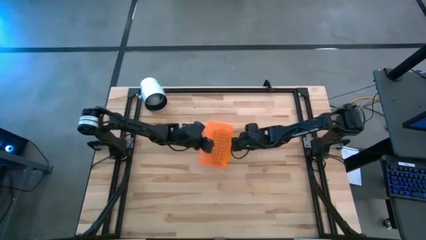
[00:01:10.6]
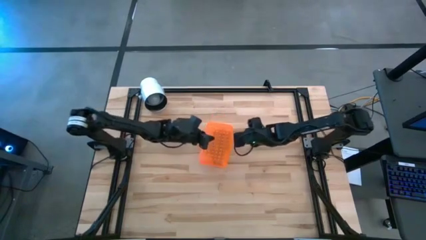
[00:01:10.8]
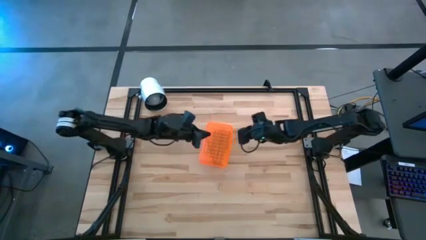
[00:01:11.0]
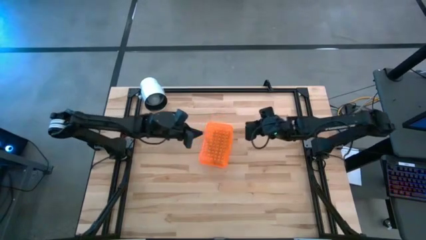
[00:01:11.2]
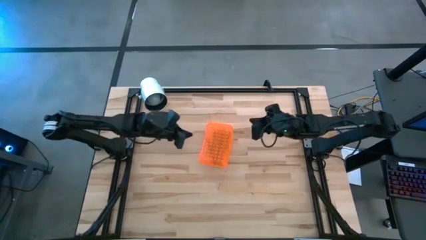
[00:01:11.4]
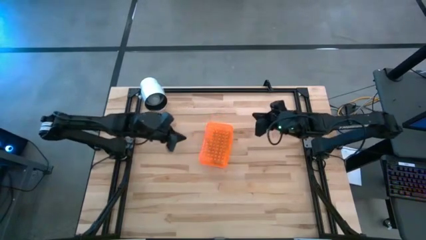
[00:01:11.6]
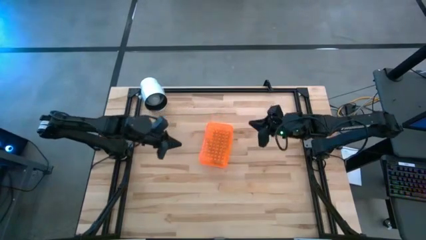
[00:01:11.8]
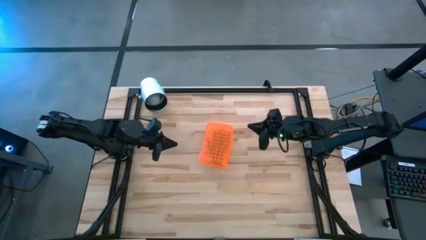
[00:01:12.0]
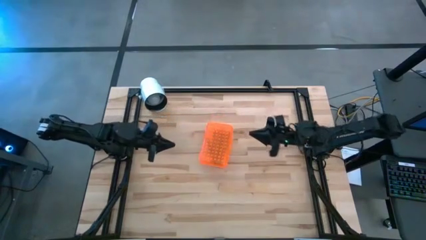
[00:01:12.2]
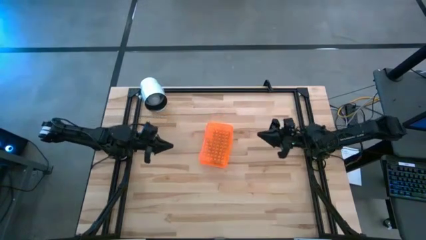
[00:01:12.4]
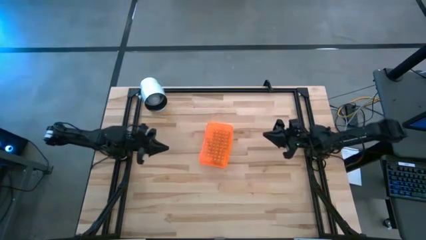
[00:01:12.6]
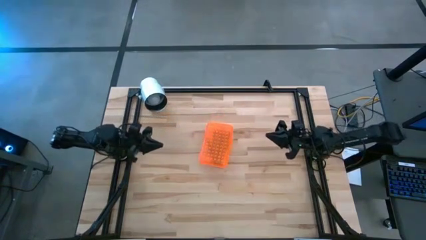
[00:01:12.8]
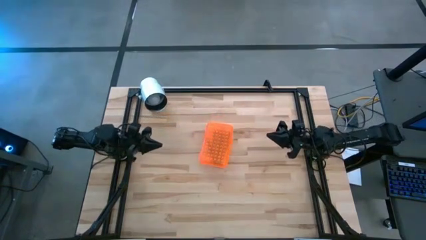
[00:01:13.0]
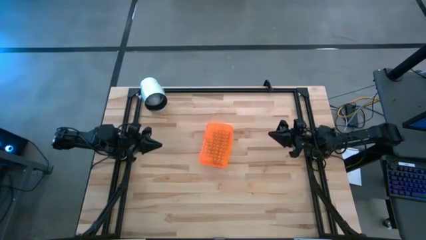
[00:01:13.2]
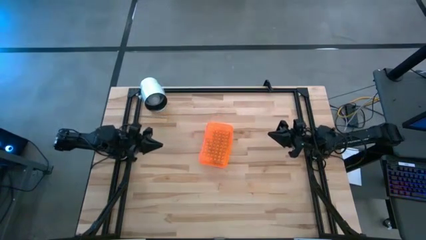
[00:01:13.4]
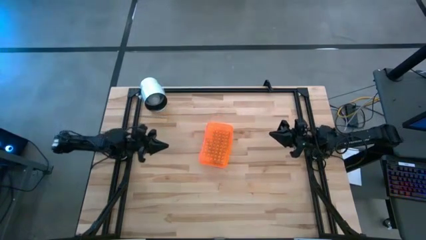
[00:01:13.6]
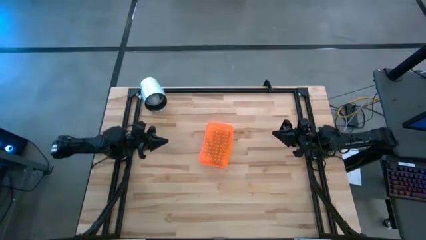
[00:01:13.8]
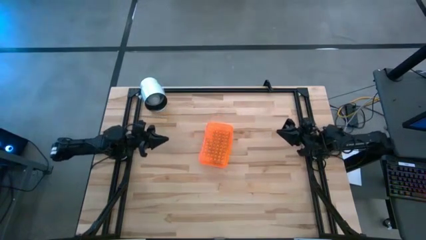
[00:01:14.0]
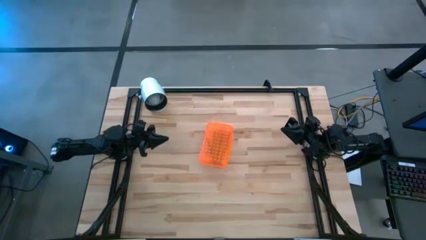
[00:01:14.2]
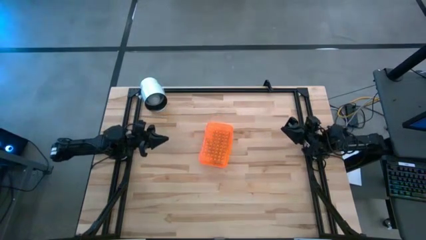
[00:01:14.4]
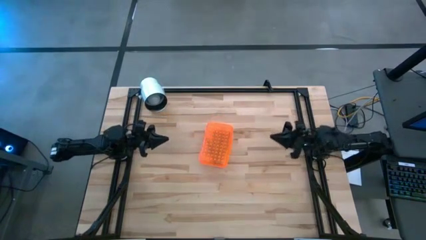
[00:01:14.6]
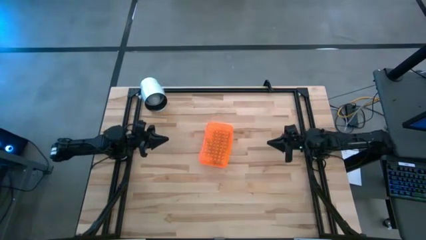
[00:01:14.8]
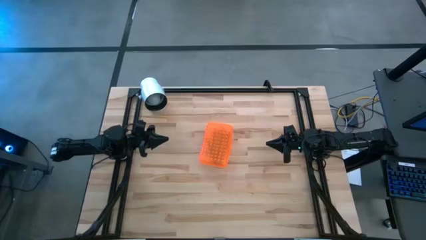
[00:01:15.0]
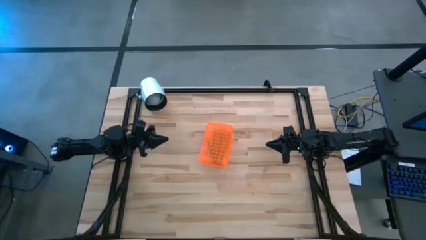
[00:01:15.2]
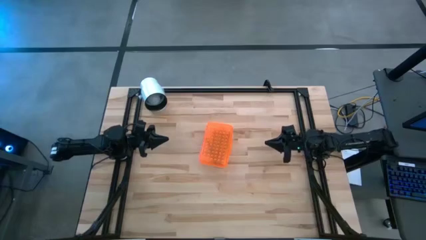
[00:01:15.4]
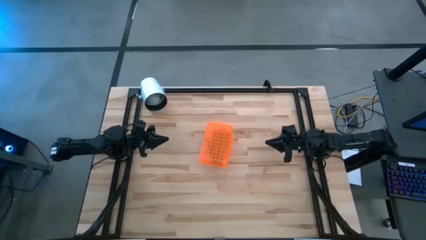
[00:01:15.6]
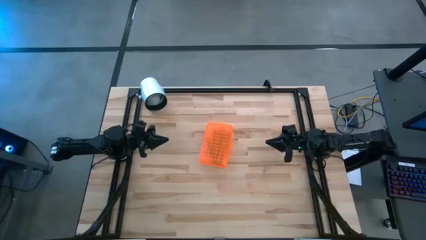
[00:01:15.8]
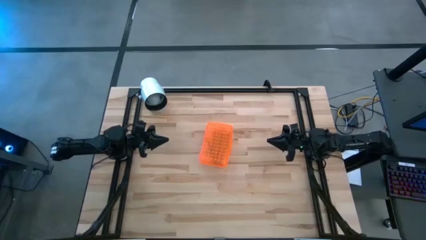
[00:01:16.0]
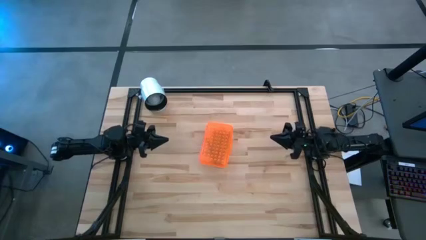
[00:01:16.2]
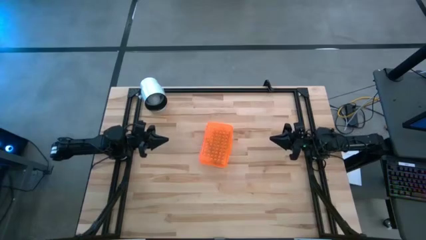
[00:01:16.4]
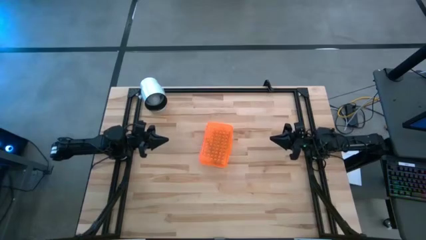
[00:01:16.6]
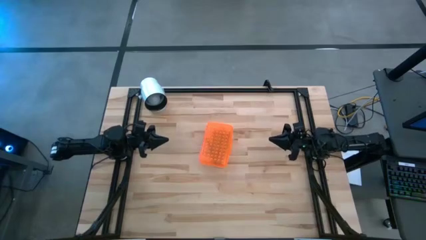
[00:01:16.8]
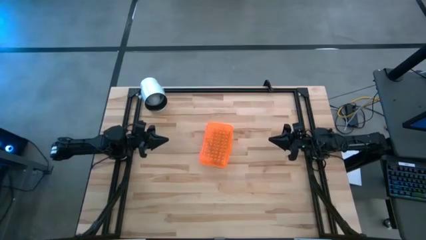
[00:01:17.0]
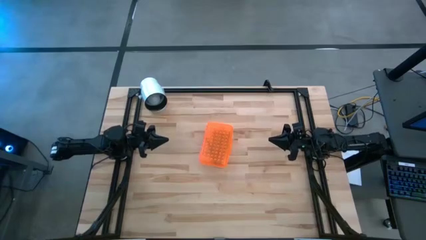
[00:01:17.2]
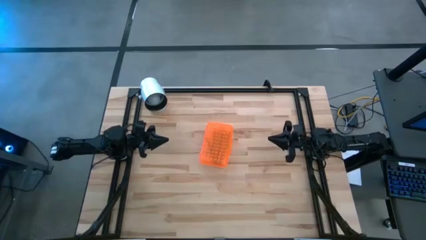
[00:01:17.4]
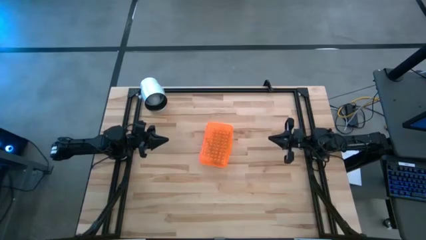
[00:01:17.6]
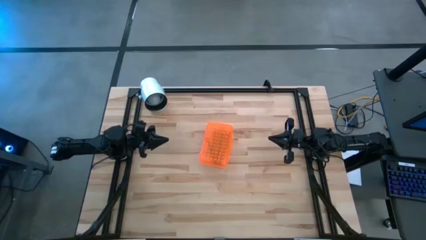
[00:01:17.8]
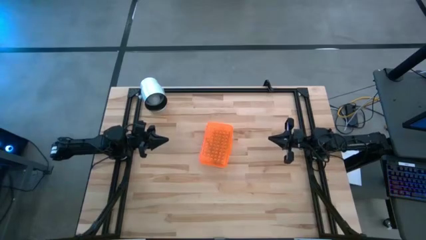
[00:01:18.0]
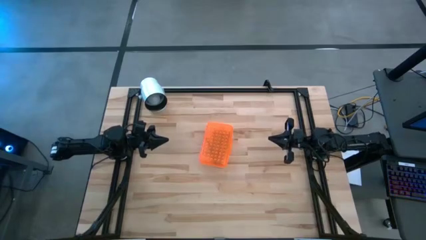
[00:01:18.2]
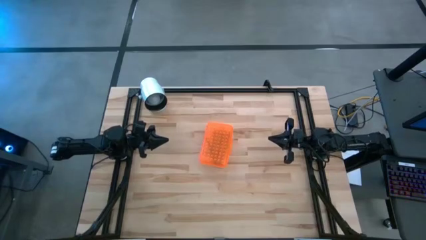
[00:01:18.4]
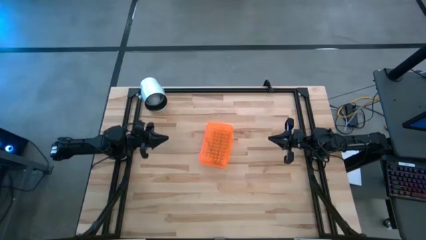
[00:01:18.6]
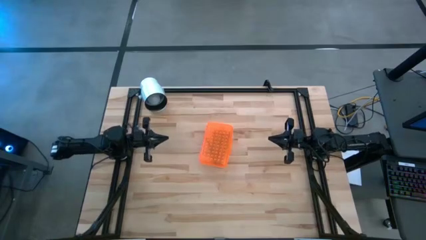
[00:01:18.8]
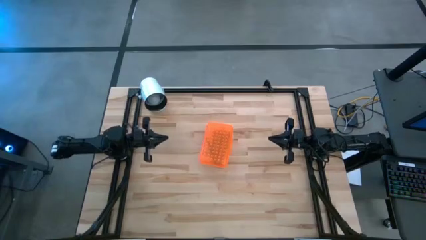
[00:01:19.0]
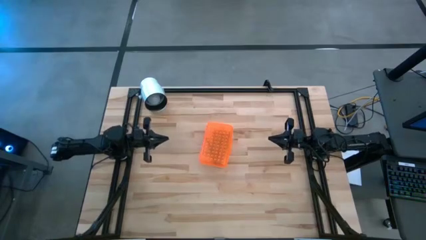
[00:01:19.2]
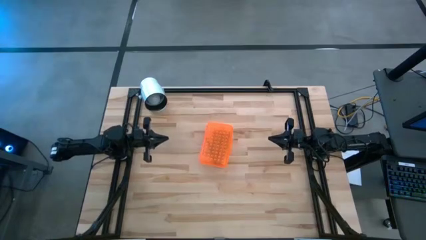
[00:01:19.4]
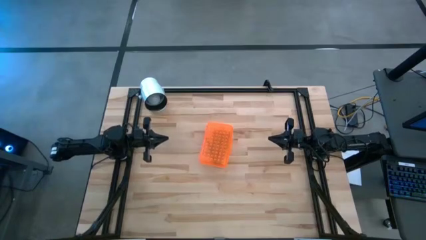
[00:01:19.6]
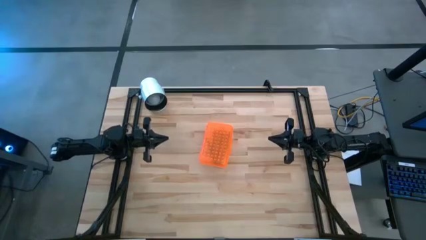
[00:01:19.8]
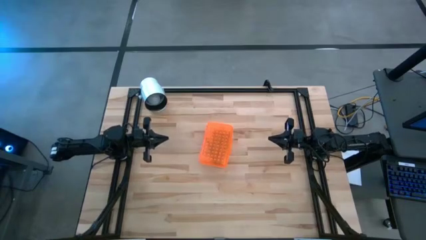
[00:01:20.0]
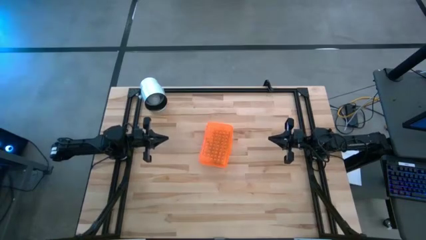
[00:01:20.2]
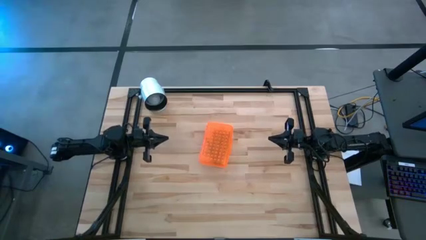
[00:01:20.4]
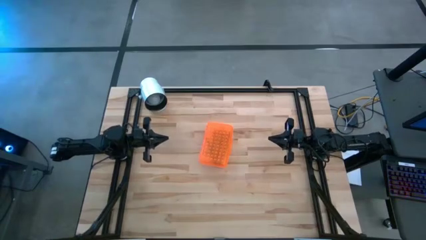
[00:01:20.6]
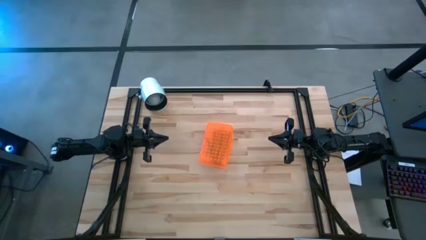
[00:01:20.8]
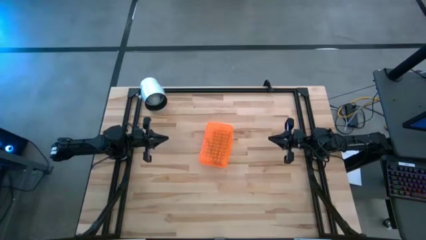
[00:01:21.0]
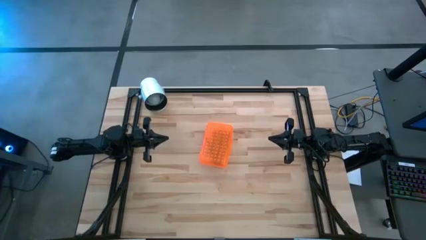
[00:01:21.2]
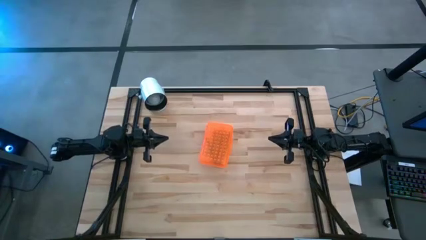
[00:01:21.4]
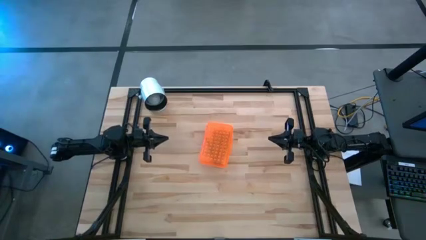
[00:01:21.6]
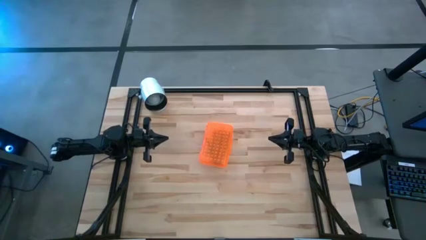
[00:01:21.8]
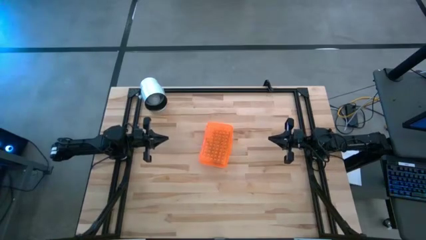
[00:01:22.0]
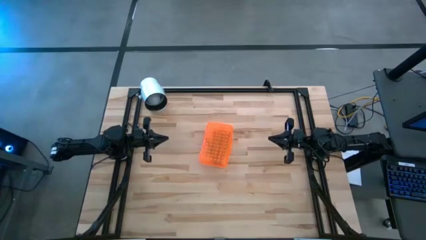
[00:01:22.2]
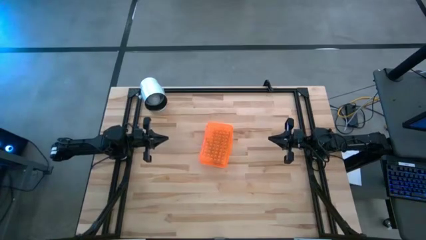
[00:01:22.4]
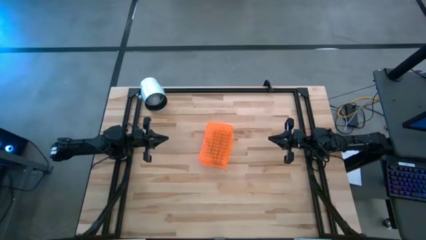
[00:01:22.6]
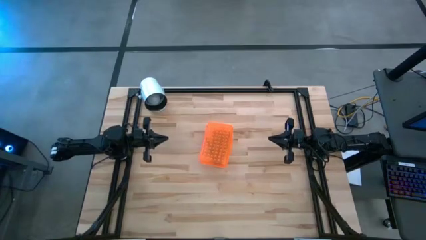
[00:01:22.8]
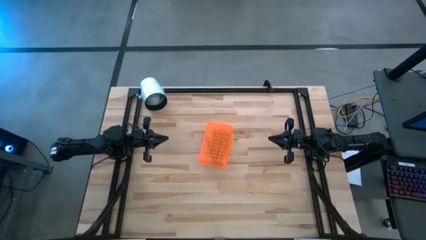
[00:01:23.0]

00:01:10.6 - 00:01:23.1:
Task: Pick & place school supplies into a supply box
Return to Home Position

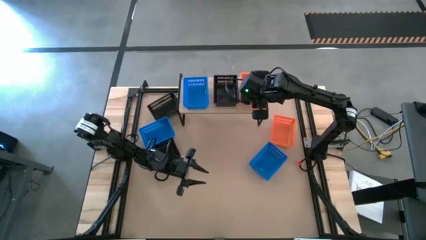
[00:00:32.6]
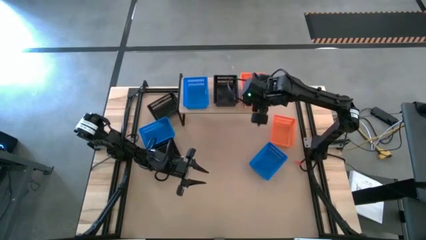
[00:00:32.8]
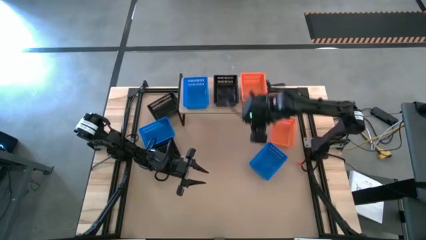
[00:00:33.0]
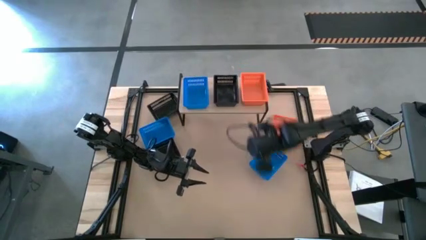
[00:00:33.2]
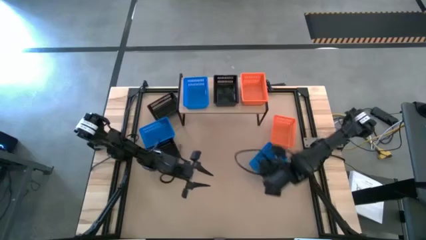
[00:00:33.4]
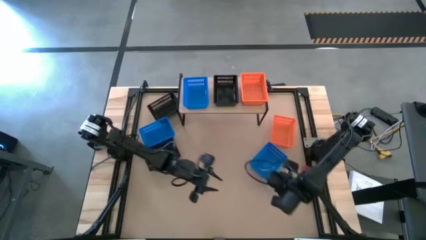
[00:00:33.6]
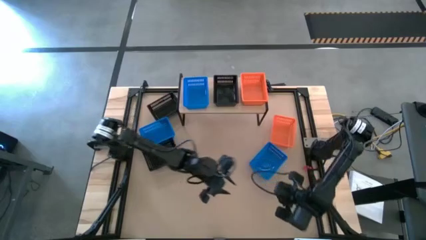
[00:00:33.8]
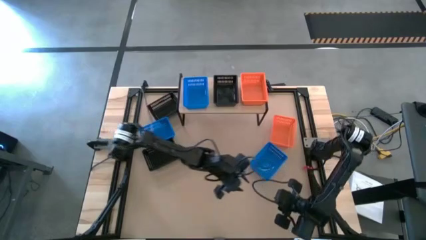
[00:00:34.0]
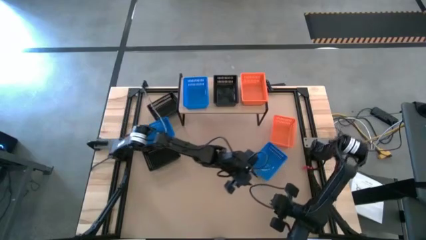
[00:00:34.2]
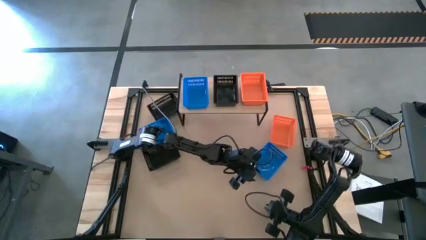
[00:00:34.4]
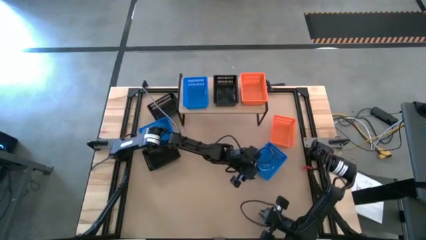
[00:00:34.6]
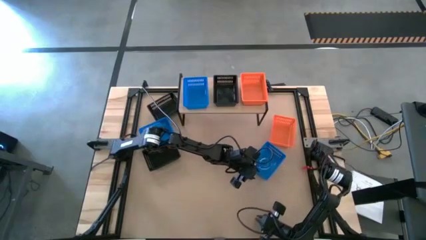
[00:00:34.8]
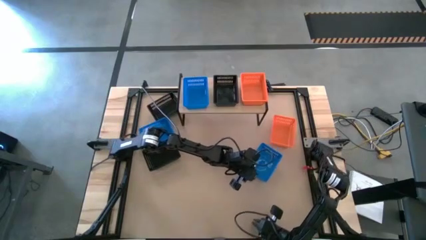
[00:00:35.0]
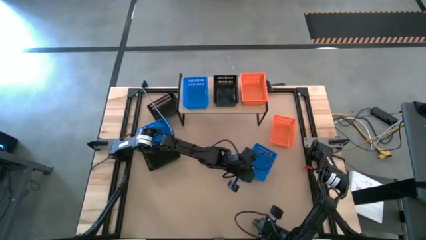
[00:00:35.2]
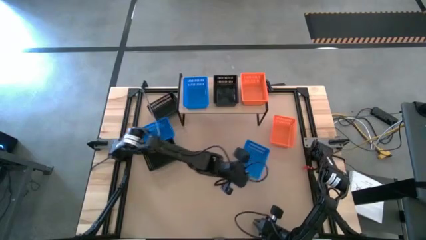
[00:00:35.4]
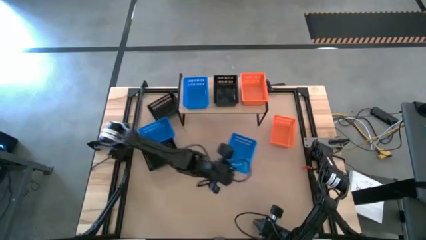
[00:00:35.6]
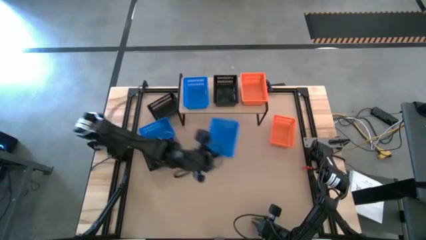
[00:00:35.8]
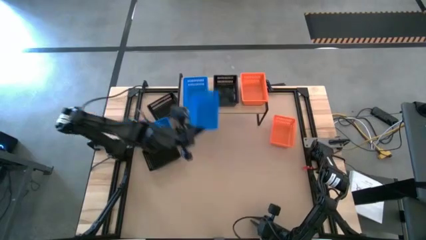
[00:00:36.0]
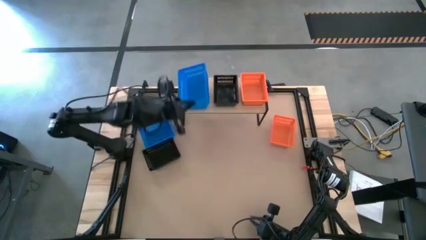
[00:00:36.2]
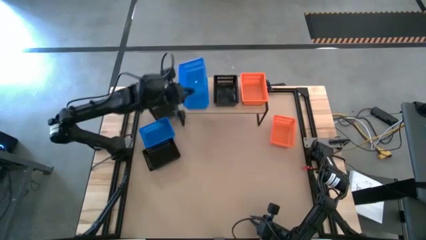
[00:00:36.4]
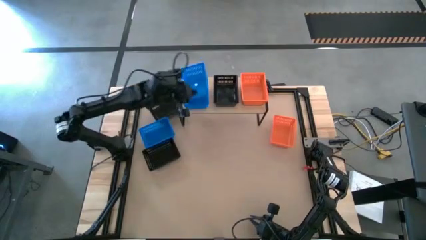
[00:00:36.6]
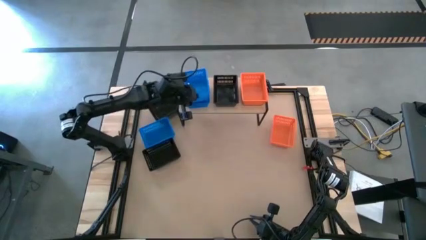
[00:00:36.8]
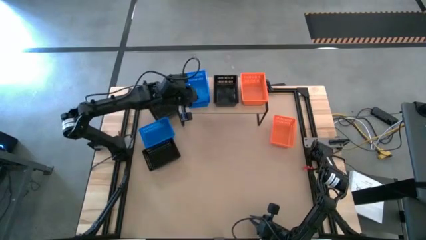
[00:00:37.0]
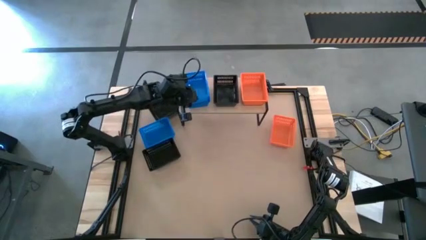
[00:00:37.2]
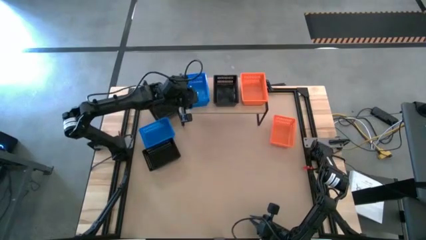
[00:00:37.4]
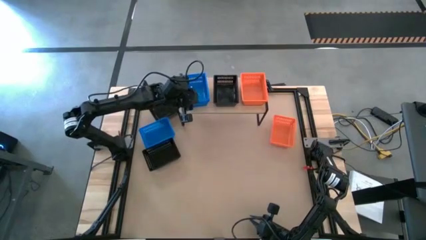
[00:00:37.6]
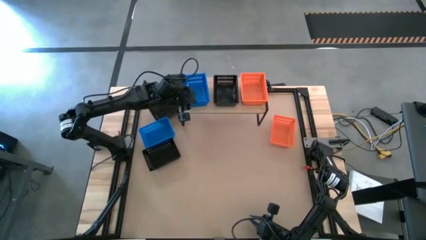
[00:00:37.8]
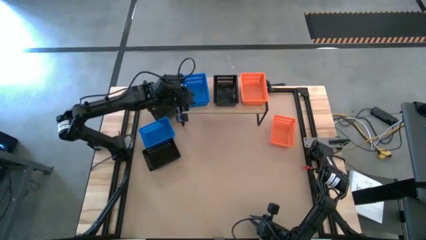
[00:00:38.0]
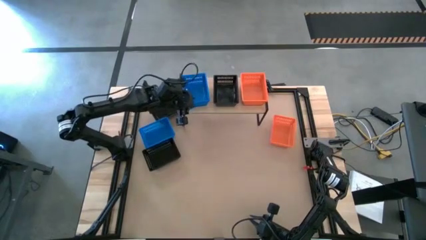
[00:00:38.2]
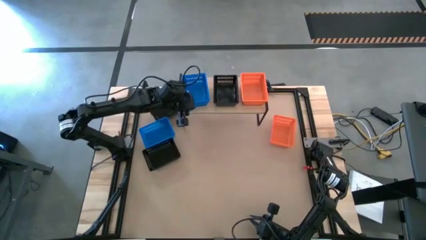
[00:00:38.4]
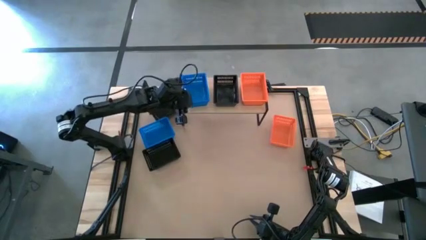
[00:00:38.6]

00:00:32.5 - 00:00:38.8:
Task: Stack baskets on shelf by color
Stack the right blue basket on the blue basket on the shelf
